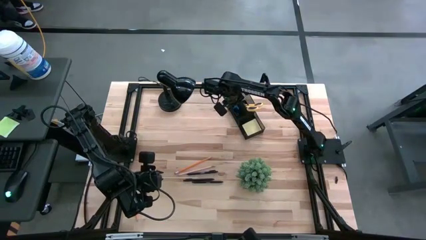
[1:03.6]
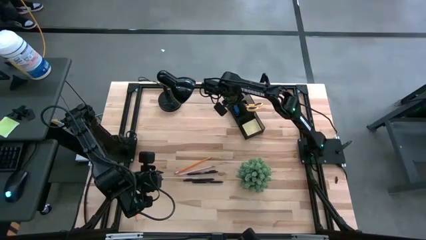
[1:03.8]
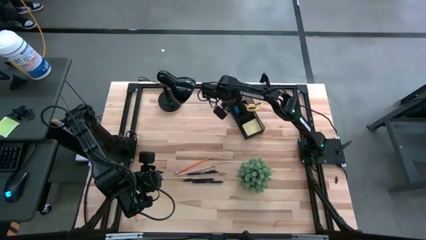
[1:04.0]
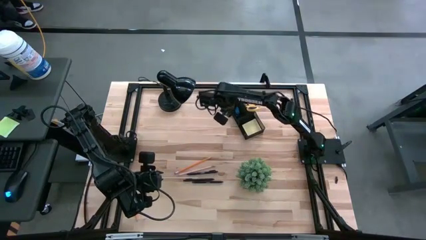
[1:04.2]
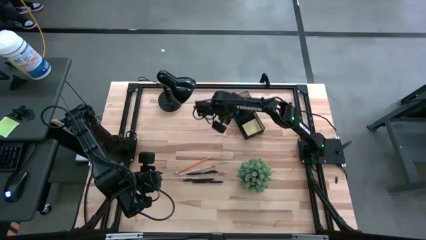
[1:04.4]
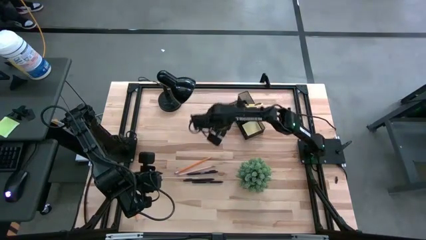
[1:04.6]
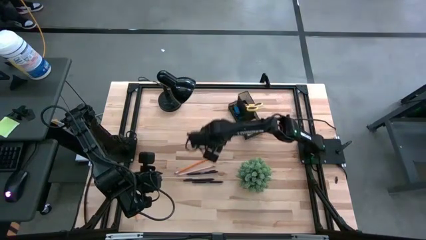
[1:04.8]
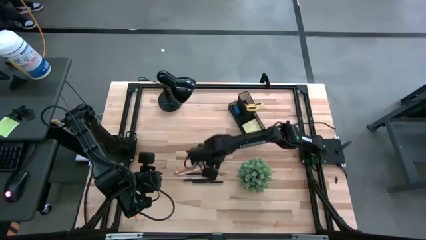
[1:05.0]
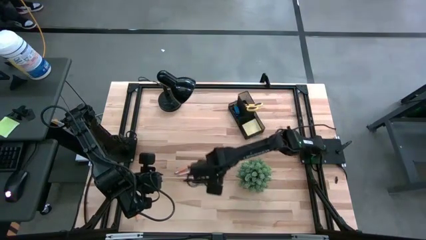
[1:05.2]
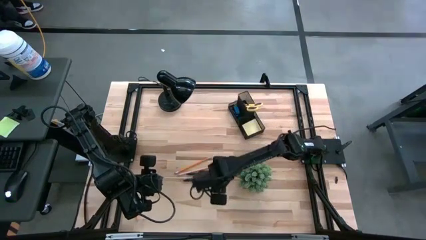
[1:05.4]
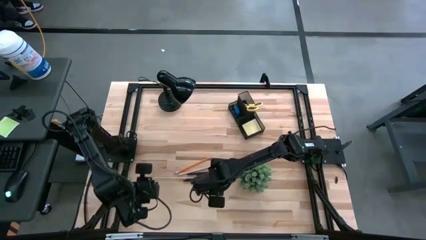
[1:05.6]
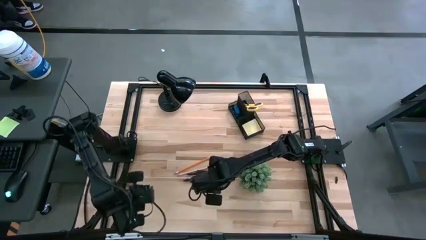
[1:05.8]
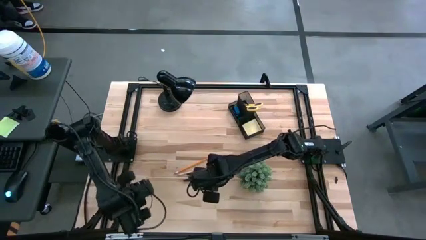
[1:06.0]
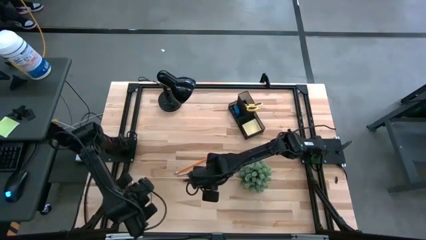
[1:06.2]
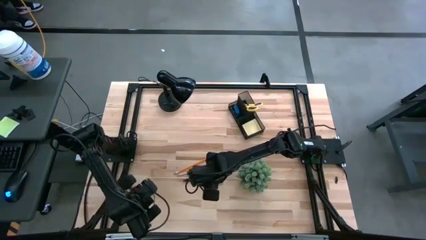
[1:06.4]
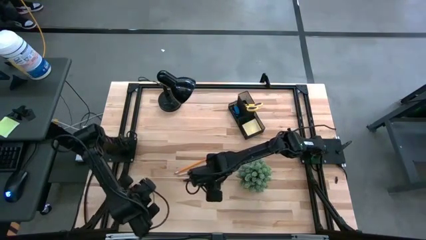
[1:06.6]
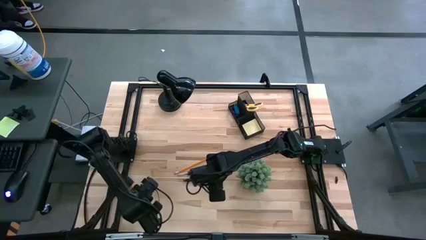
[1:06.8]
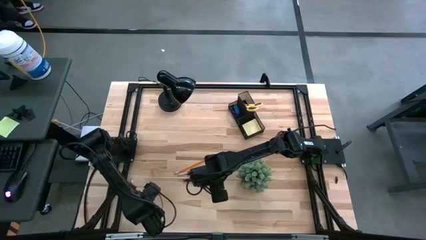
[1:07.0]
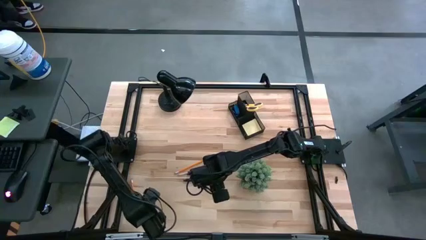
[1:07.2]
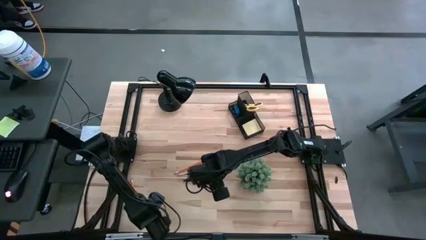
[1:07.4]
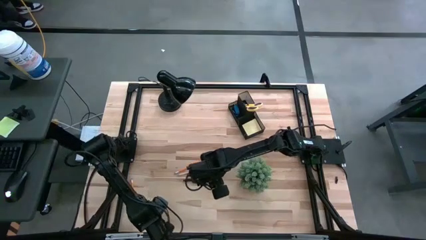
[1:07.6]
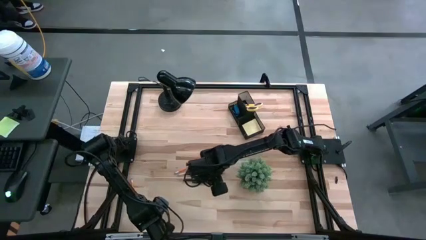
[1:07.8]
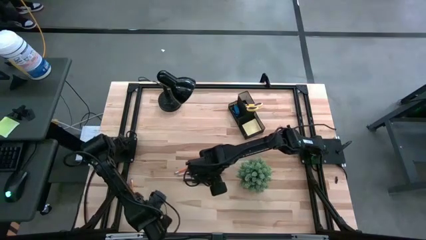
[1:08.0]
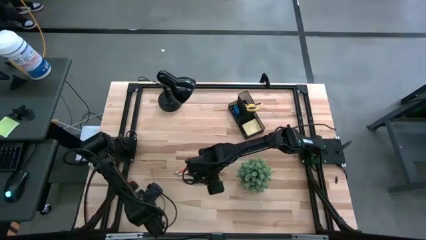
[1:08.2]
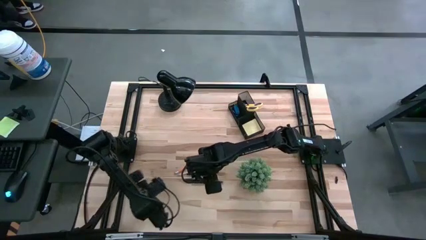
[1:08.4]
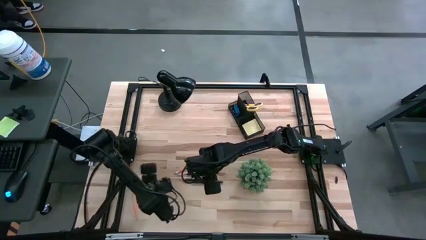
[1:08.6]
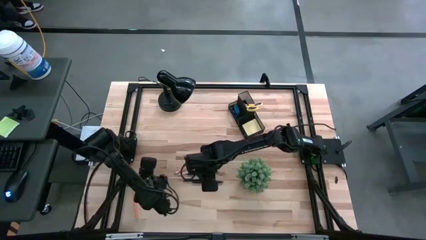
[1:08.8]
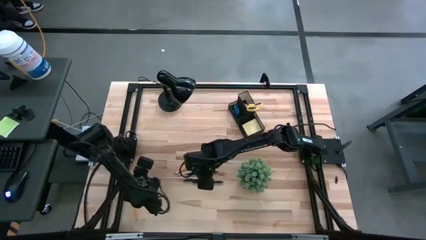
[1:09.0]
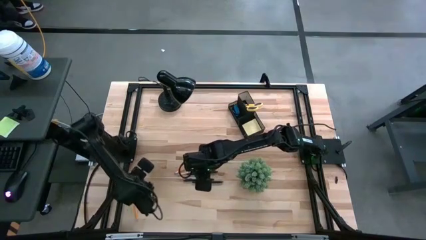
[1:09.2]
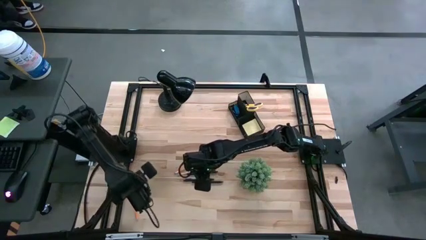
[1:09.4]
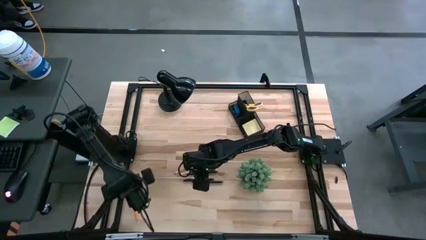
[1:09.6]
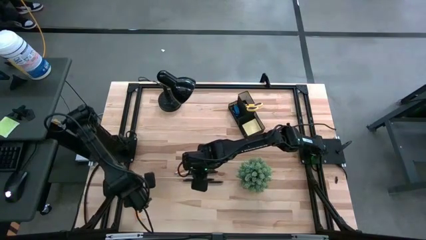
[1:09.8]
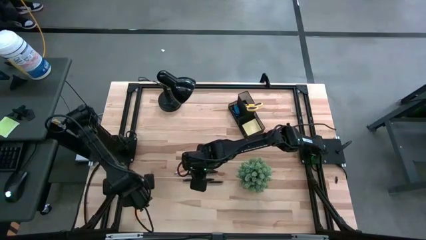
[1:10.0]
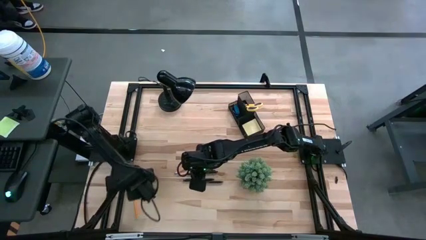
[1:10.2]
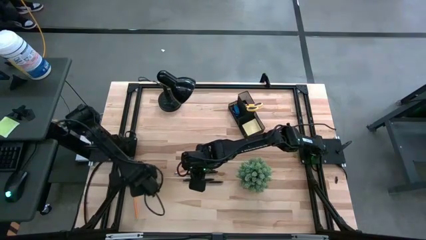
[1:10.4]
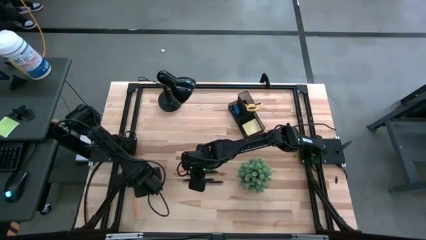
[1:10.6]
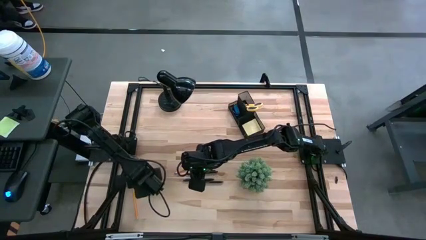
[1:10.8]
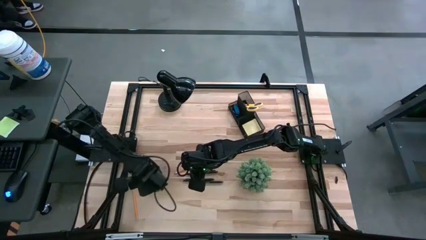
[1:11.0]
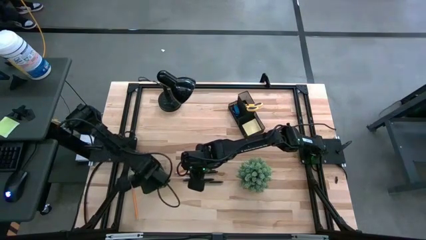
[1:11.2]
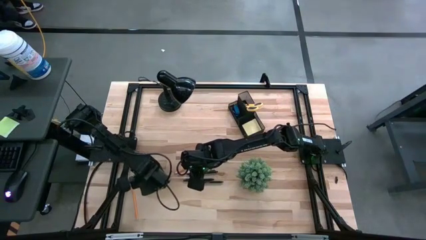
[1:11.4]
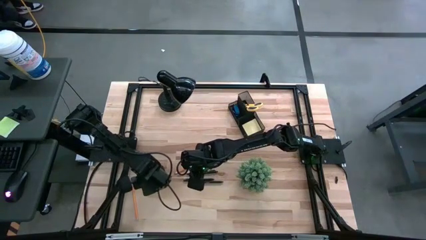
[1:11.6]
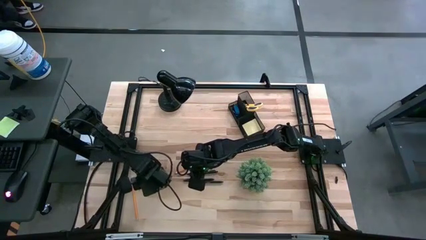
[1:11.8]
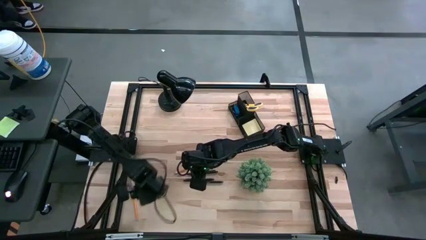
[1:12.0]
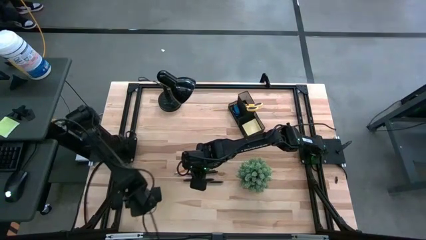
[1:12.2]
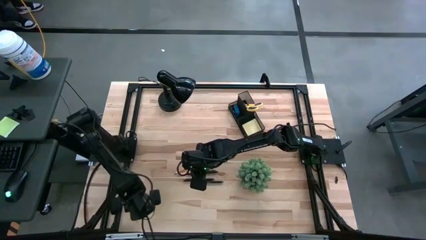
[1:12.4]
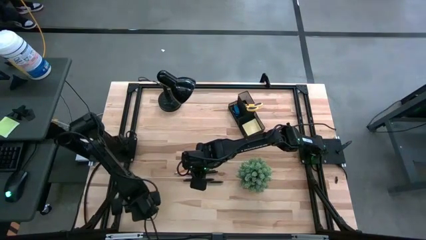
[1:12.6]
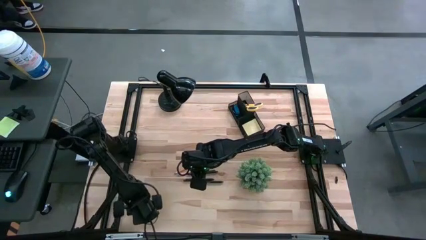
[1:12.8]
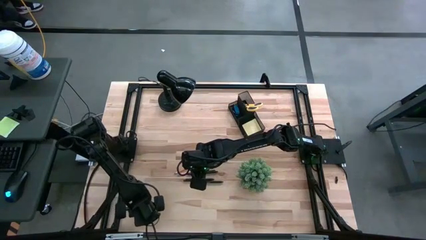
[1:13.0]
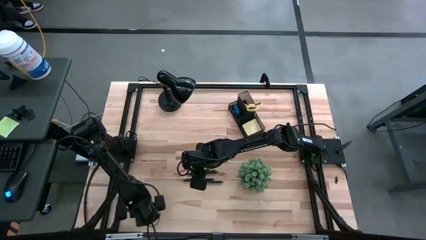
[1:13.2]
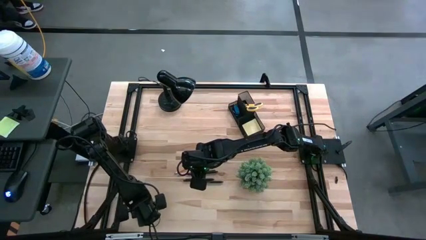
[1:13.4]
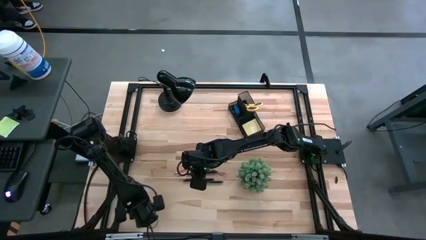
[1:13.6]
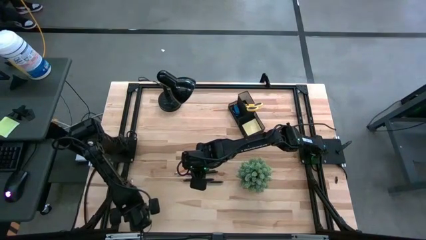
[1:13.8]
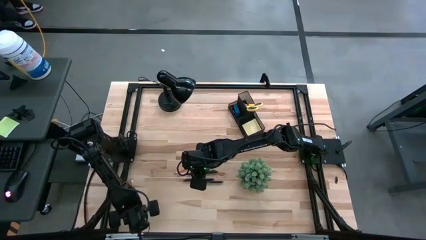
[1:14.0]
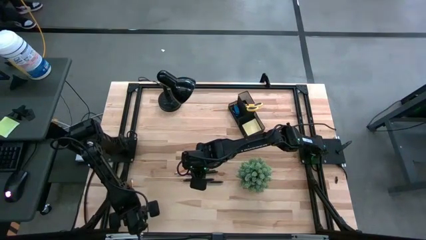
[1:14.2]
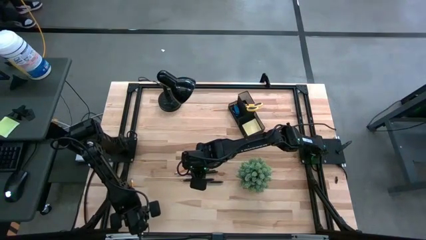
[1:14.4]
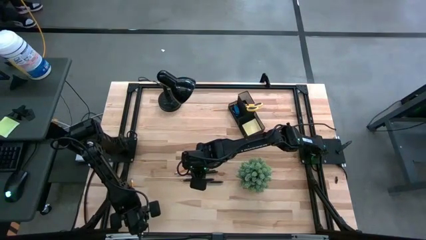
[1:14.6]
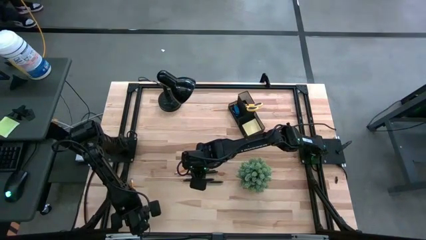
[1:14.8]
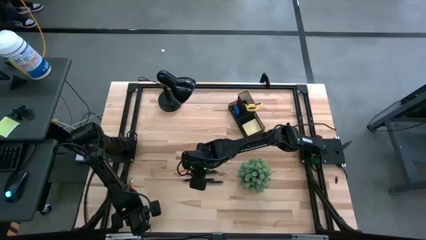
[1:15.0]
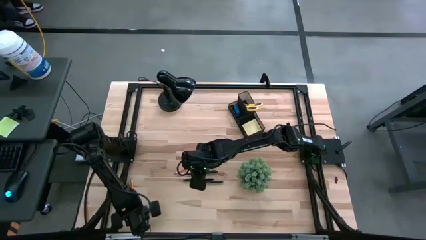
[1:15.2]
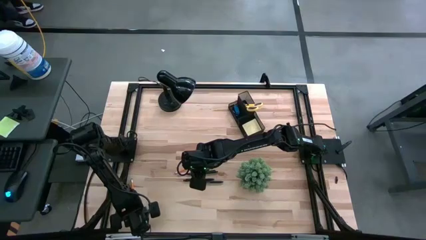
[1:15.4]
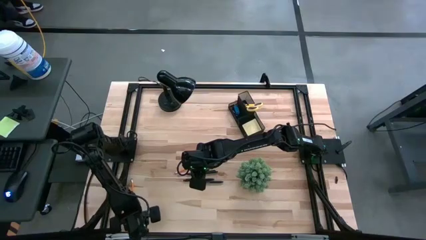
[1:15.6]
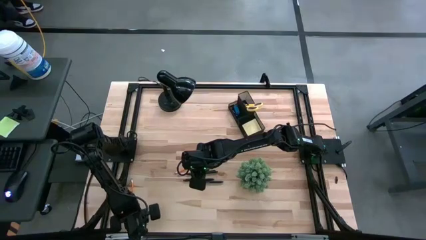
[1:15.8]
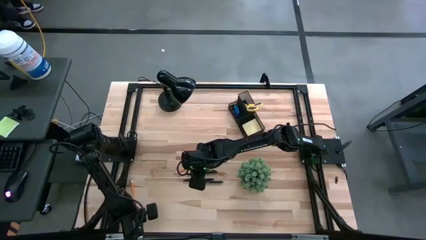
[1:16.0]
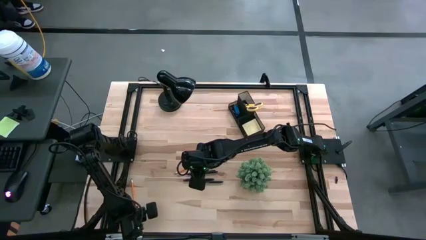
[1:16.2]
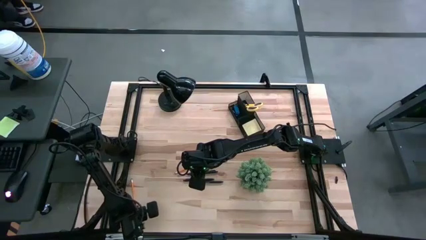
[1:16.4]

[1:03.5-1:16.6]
Task: Pick and place office supplies into organizer
Put the bottom orange pencil into the desk organizer

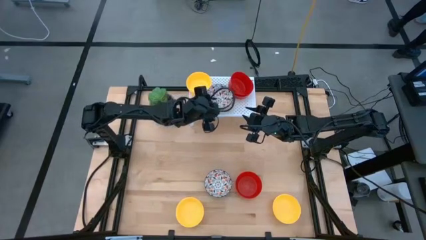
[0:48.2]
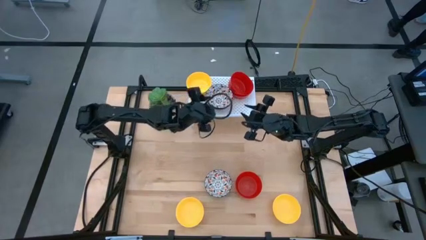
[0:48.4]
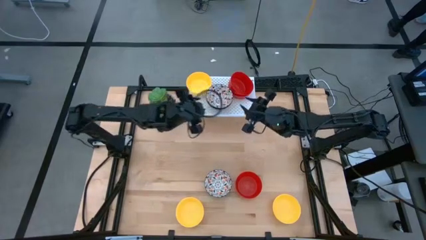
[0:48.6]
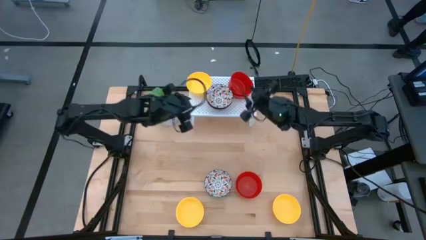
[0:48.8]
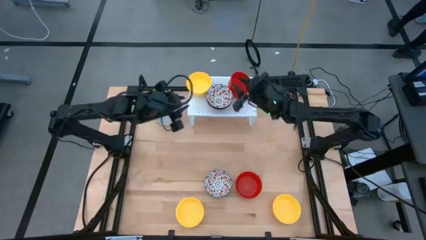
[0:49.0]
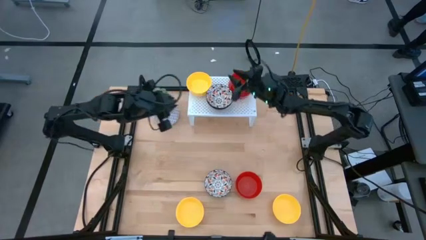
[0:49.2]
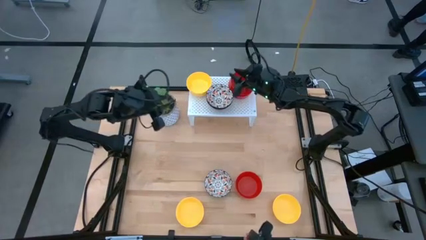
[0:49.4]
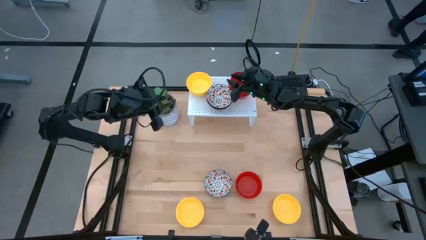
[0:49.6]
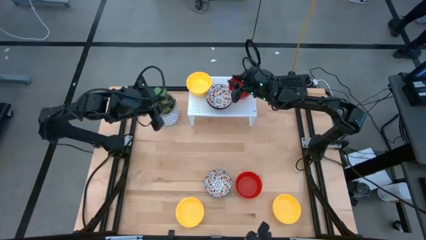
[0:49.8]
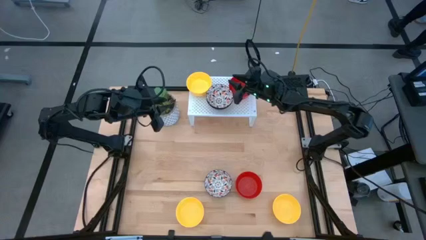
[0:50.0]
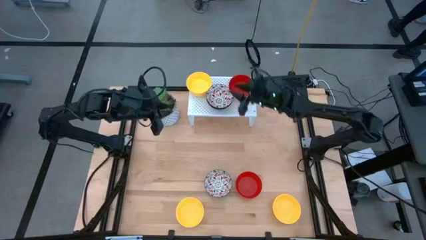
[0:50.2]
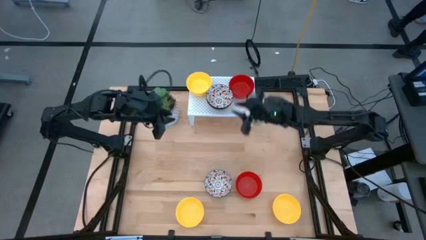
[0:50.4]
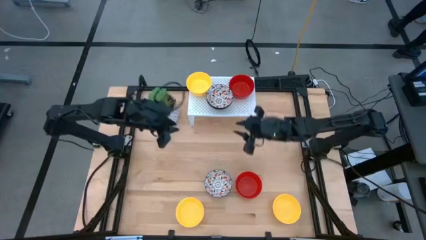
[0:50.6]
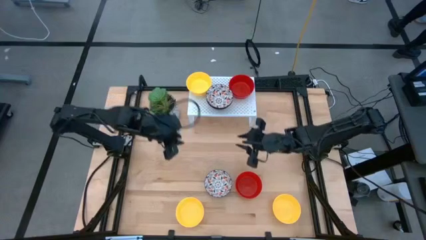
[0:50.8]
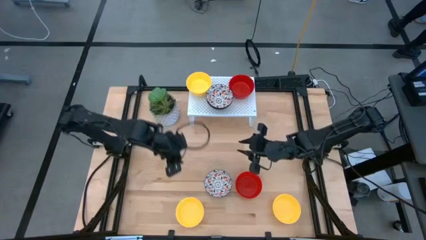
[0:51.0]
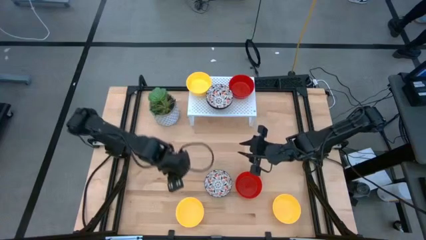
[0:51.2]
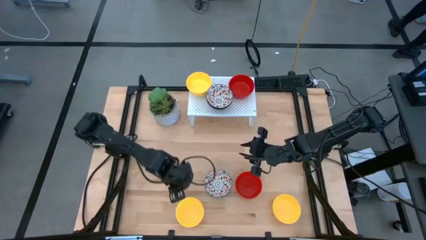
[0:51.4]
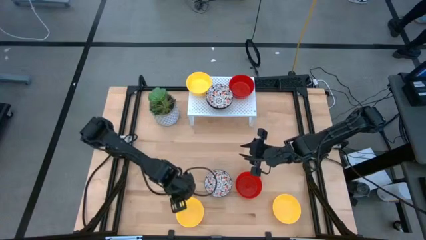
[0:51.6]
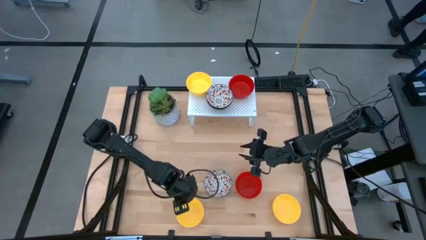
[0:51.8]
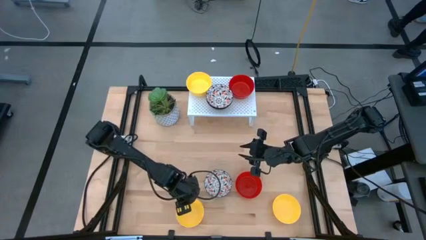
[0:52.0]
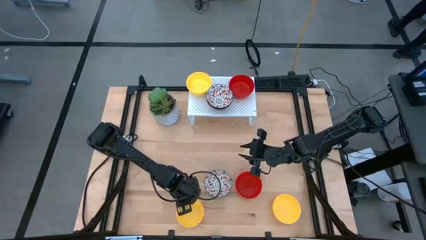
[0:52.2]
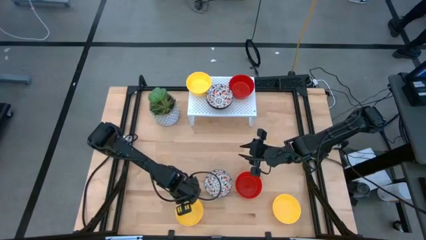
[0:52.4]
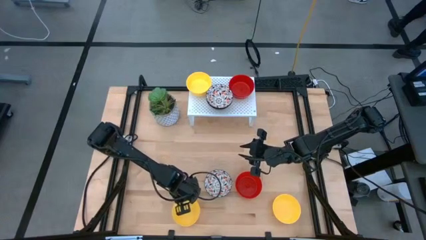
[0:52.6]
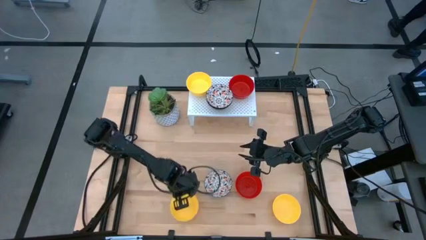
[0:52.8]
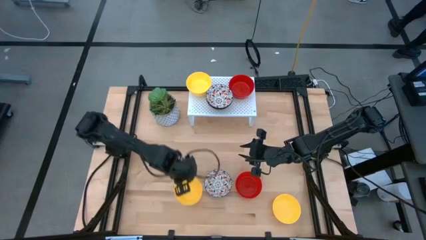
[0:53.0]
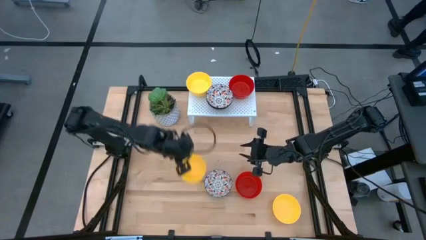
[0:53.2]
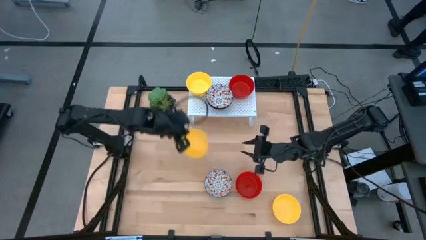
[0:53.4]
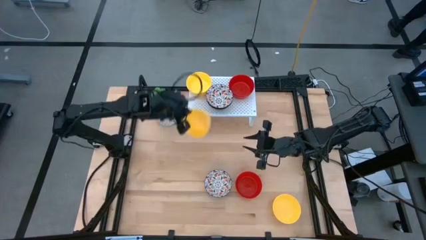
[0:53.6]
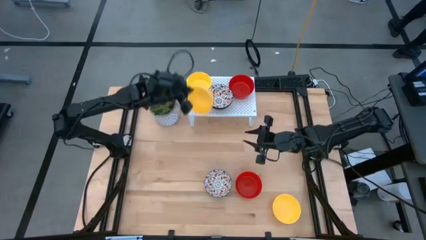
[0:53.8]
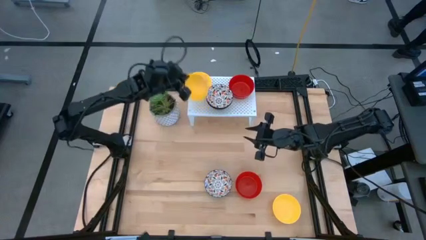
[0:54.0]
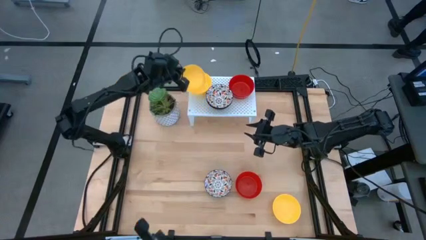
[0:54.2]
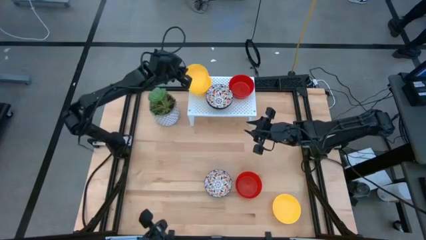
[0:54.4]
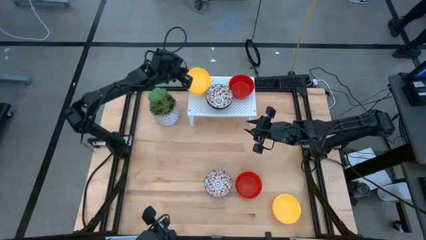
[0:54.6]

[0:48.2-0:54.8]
Task: Pick & Place Mini bowls
Stack the yellow bowl on top of the yellow bowl on the shelf
